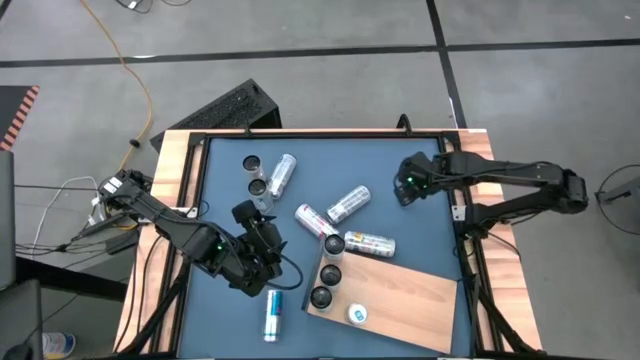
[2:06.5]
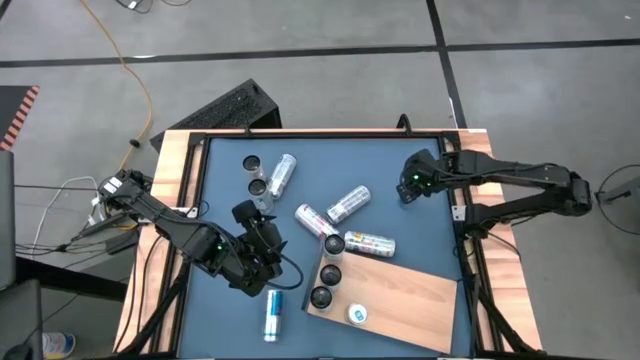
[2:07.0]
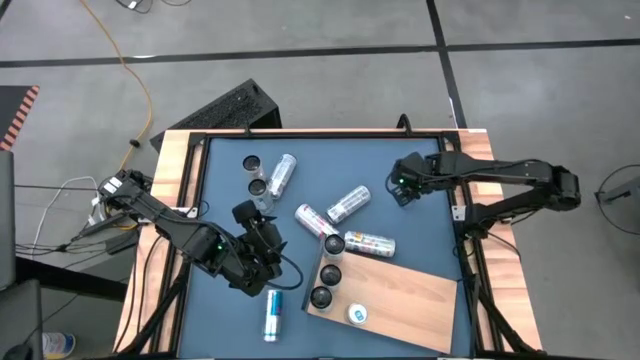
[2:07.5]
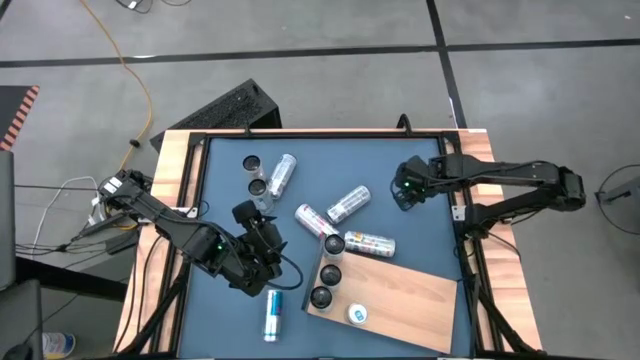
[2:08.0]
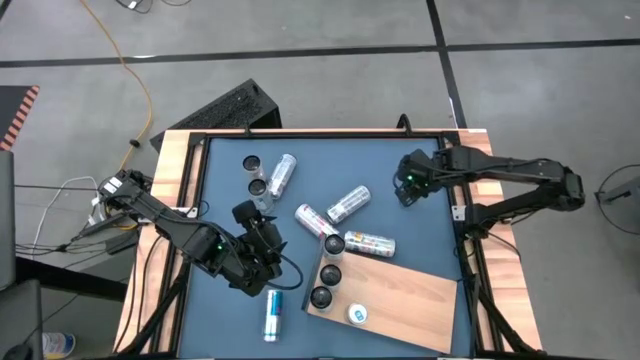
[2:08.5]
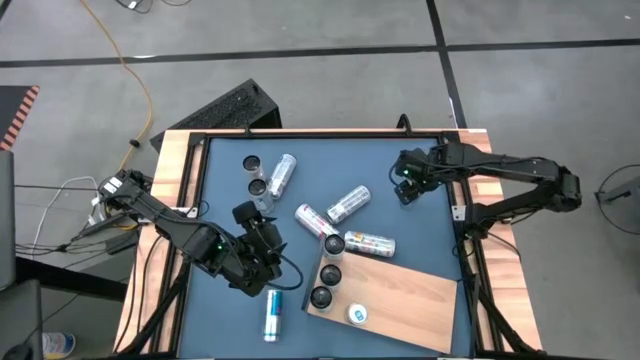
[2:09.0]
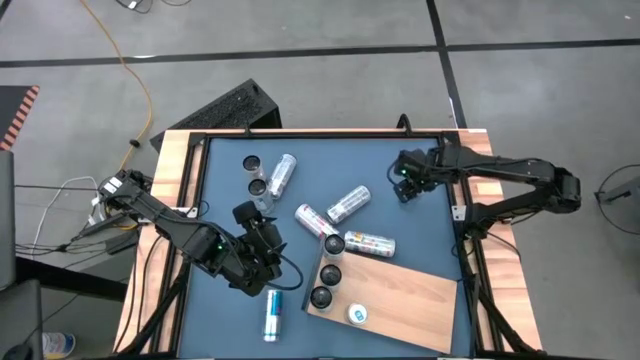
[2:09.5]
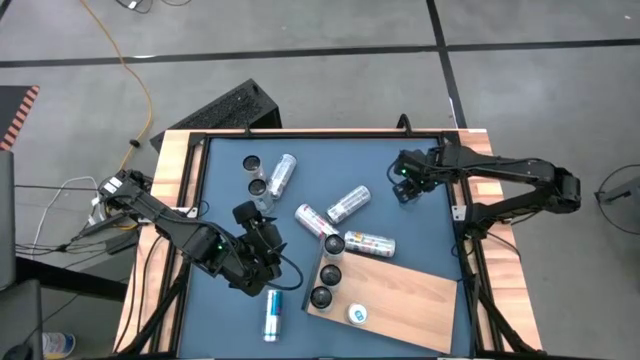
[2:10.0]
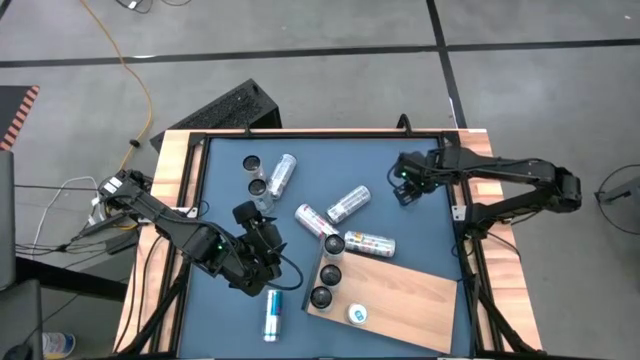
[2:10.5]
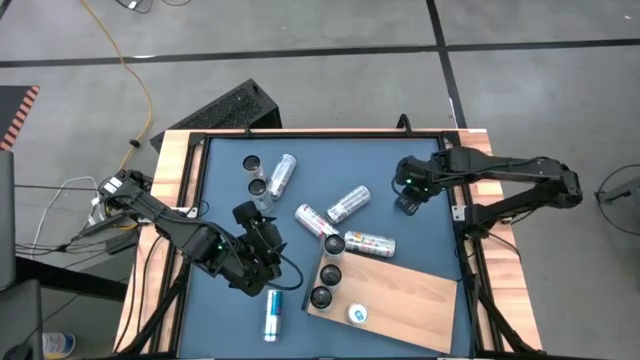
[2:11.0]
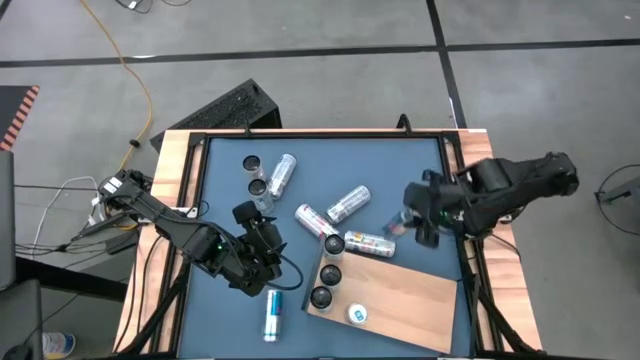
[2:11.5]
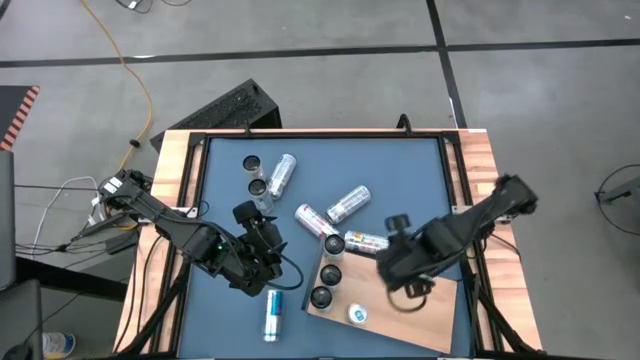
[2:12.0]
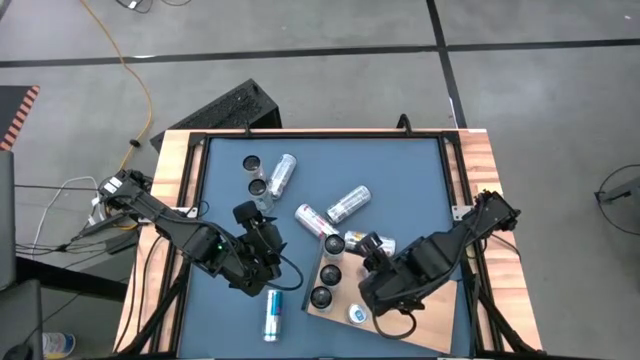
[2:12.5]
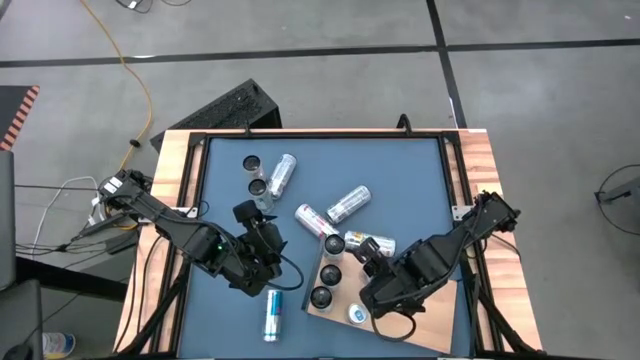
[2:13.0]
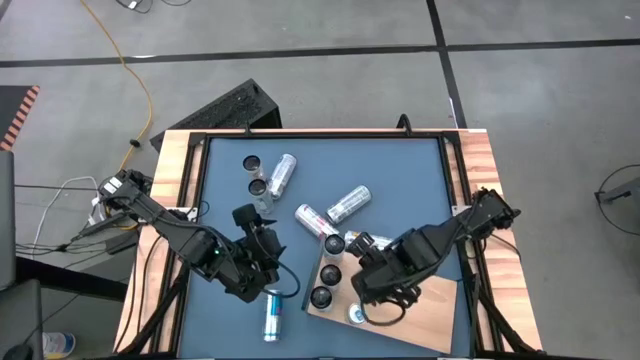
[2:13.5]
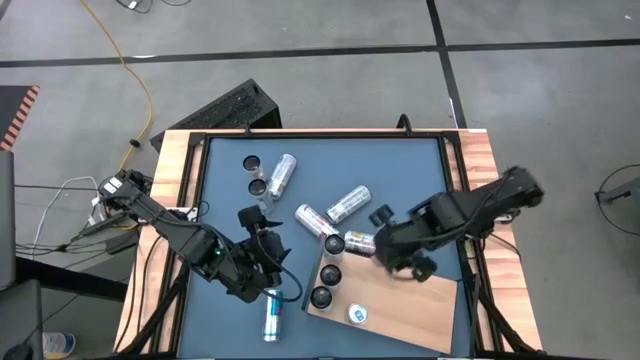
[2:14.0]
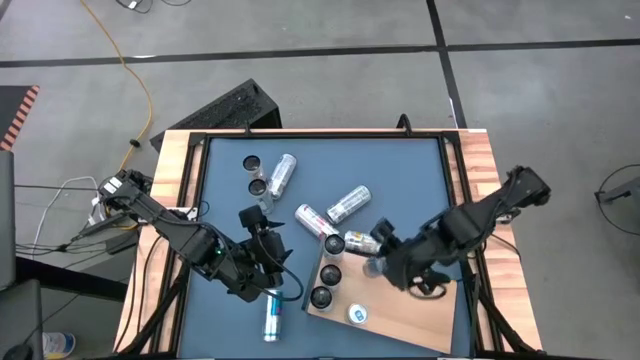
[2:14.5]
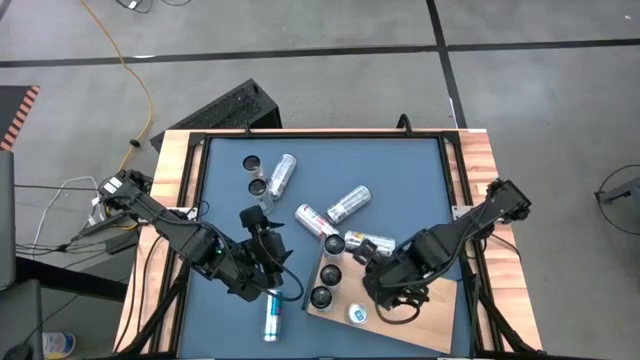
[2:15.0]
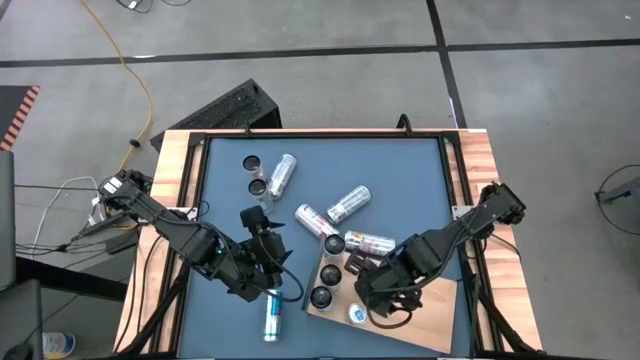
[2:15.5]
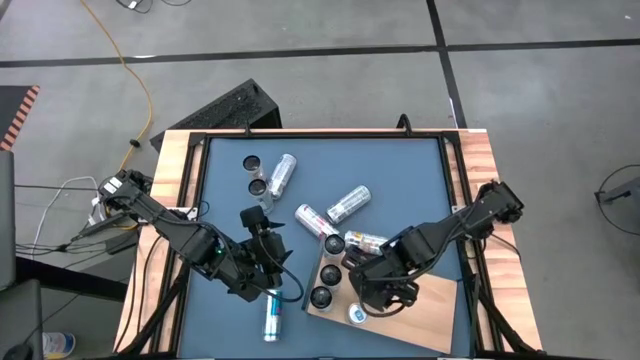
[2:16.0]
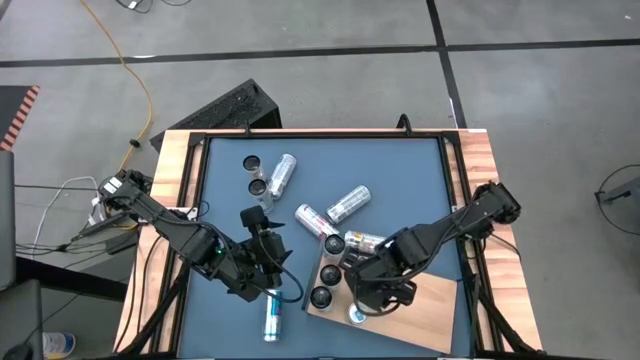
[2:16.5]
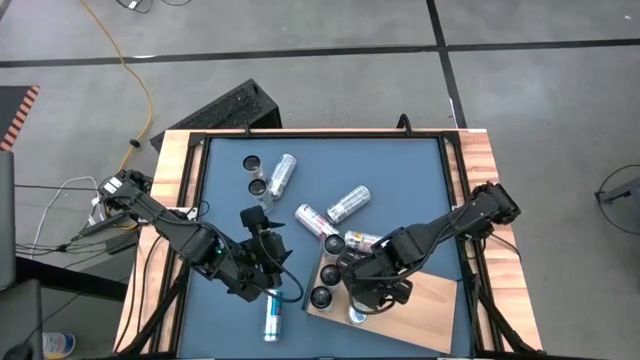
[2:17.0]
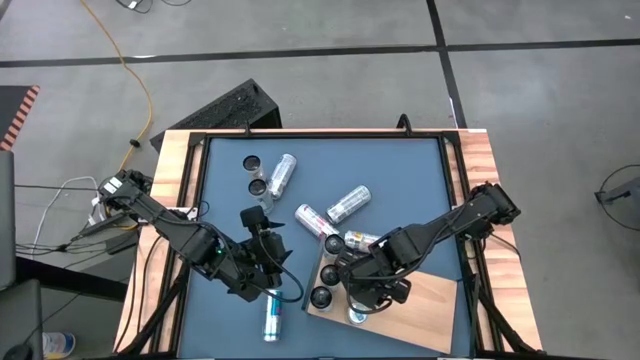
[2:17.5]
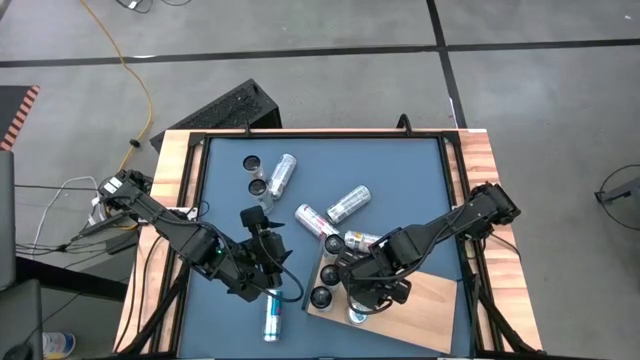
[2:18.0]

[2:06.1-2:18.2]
Task: Place canned beverage on shelf
Put the right blue soda can on the shelf

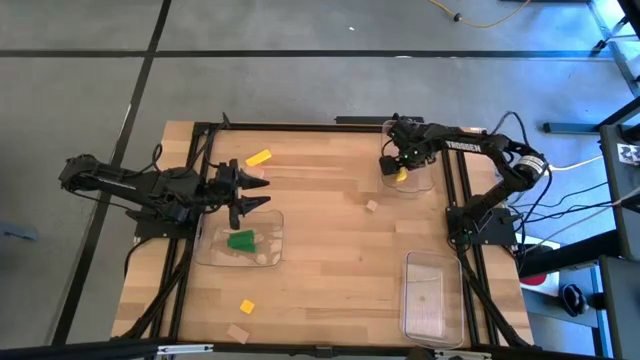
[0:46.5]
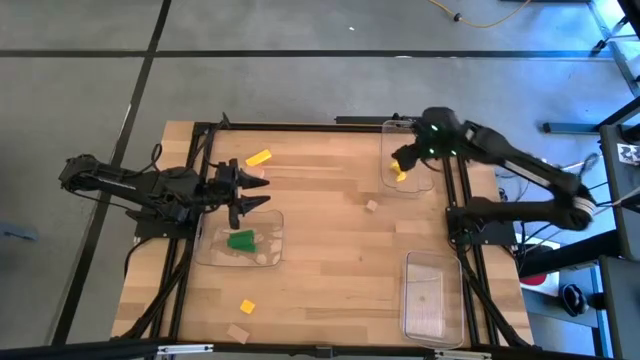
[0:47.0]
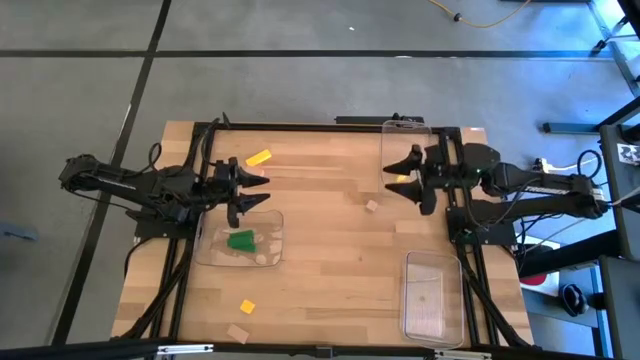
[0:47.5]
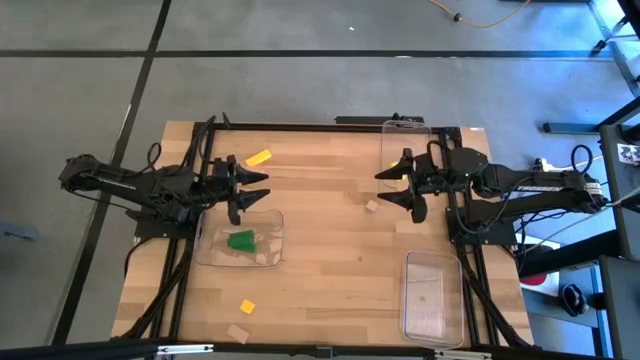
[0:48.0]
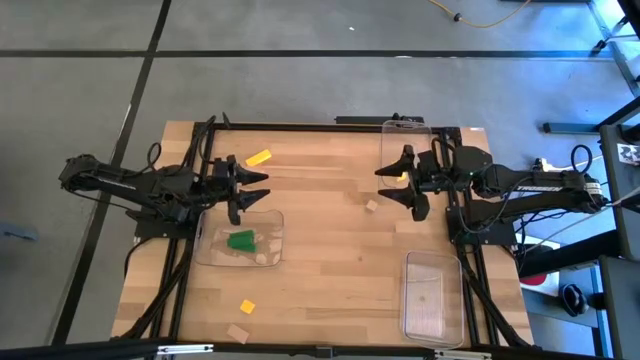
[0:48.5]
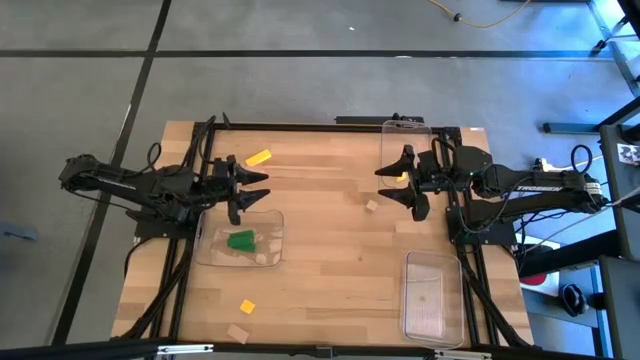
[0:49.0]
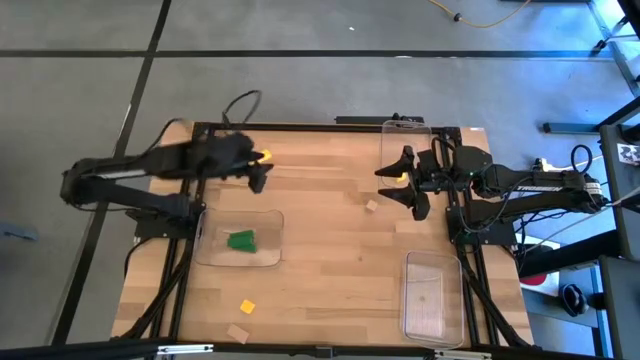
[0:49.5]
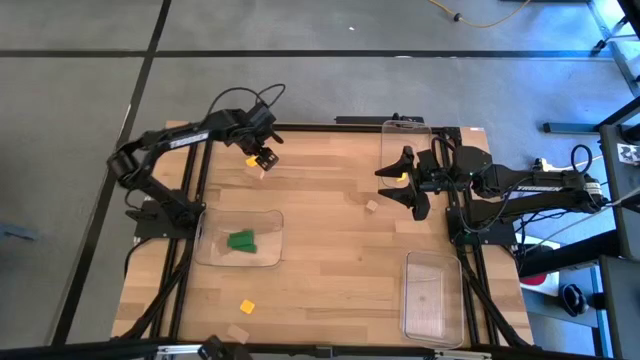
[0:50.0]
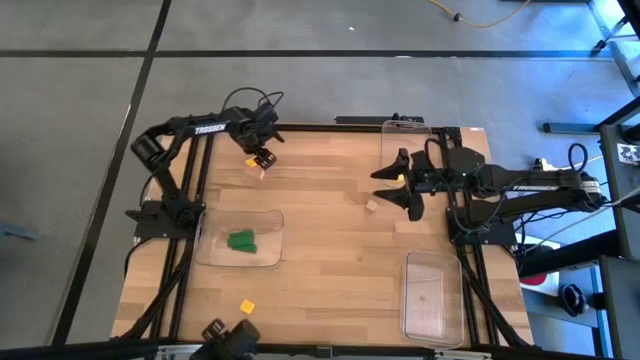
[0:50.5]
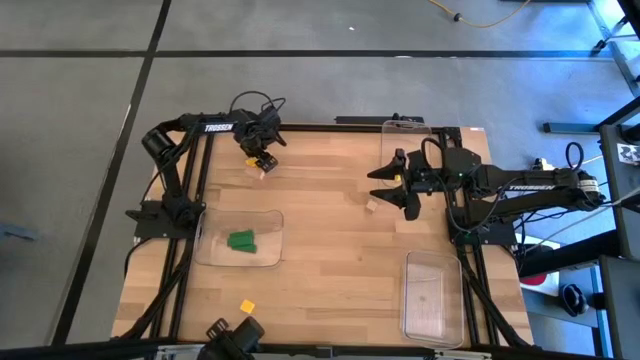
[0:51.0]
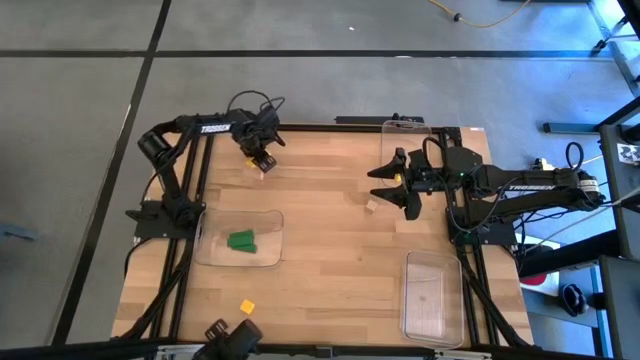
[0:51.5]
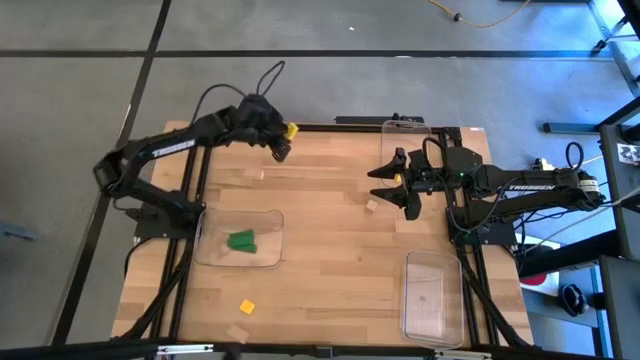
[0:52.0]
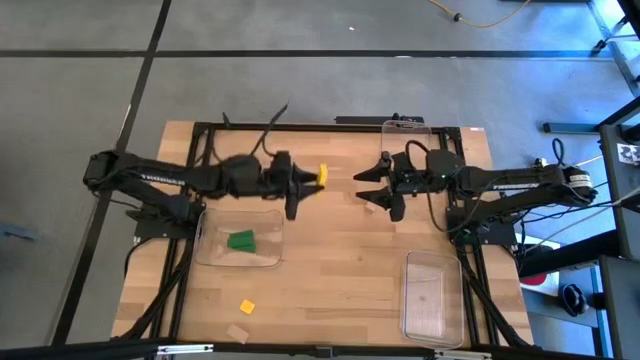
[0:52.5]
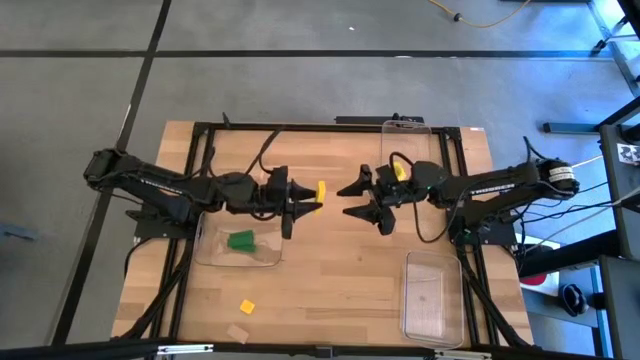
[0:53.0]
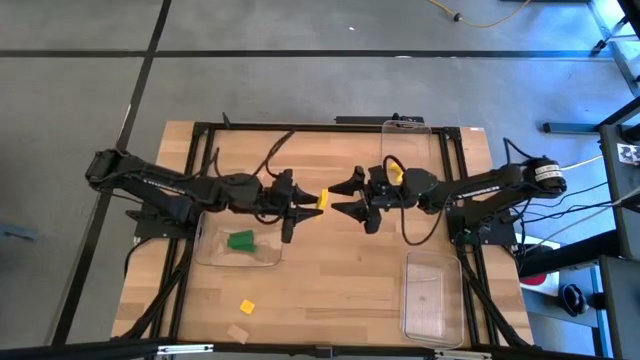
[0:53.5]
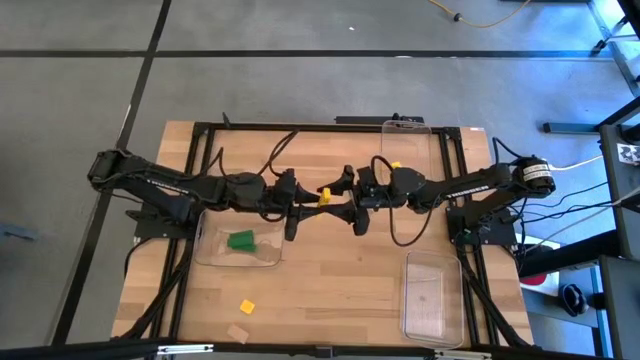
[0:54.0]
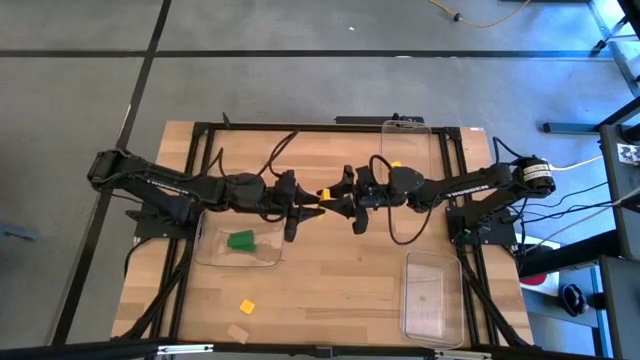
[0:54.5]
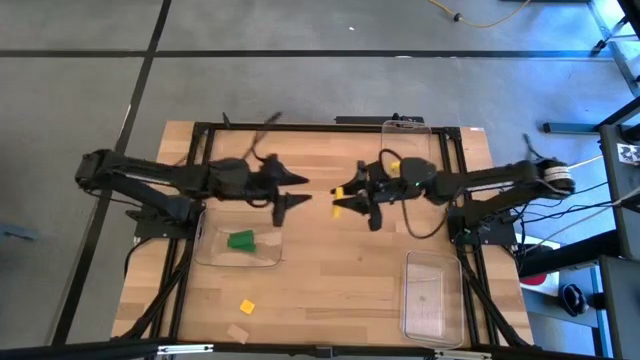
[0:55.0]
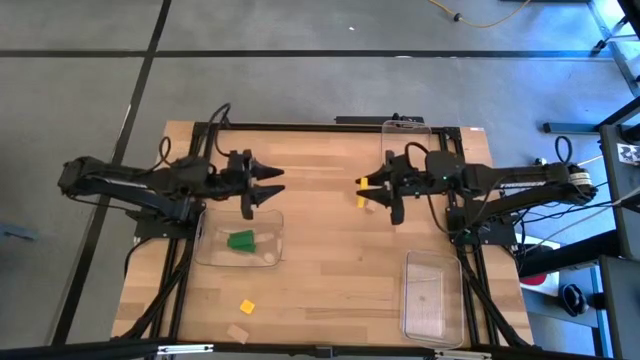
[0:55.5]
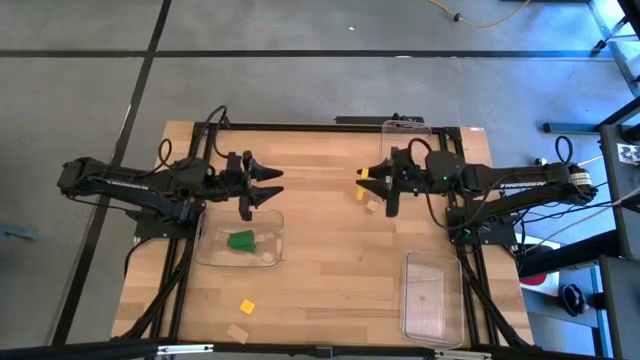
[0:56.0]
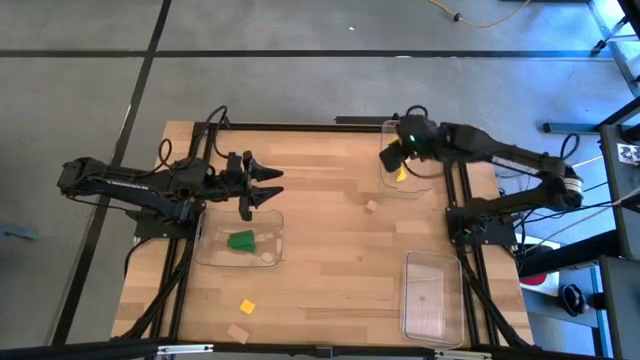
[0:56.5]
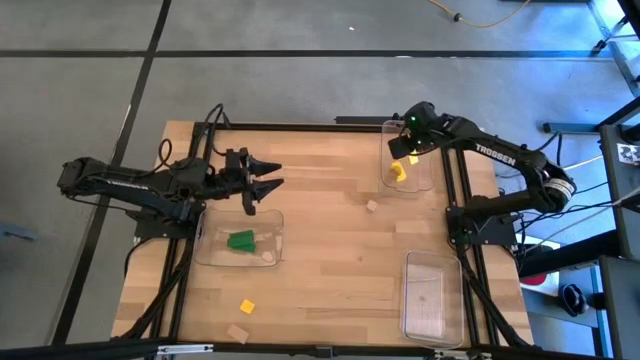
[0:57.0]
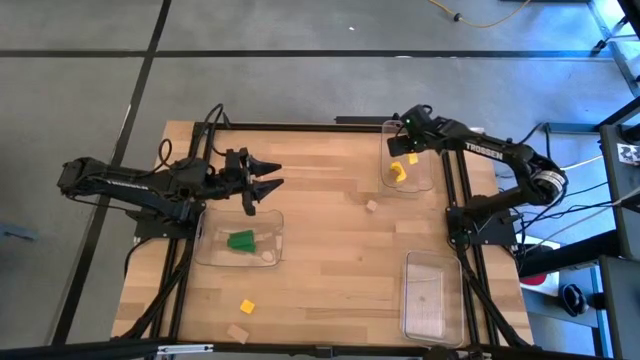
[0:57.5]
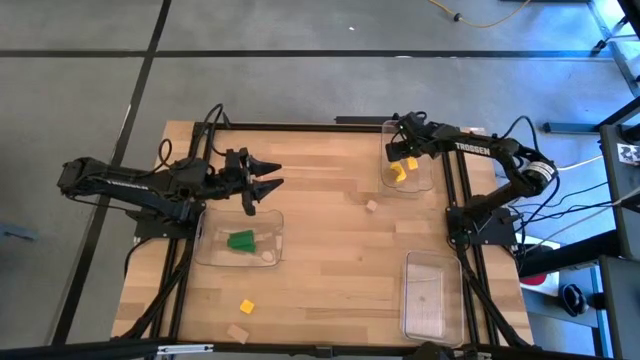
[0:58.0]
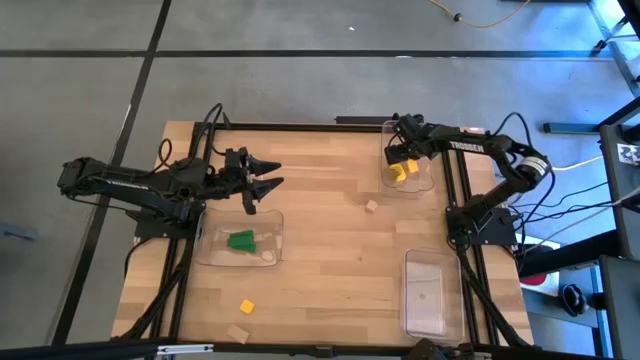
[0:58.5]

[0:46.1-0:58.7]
Task: Sort & place blocks by color
Put the top yellow block into the top right transparent bin
